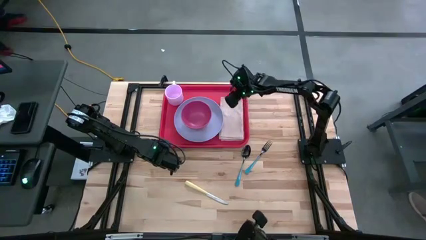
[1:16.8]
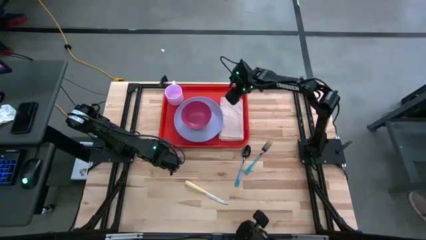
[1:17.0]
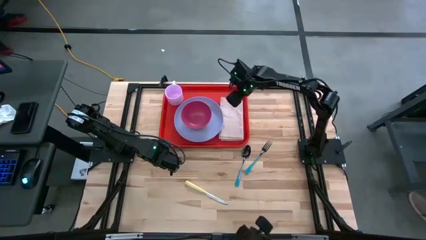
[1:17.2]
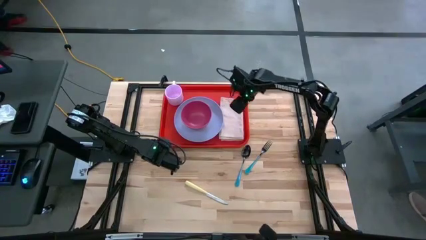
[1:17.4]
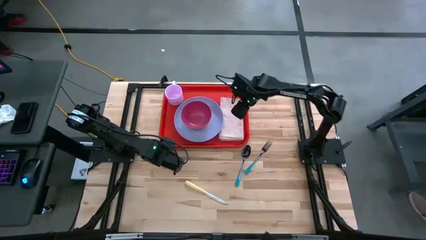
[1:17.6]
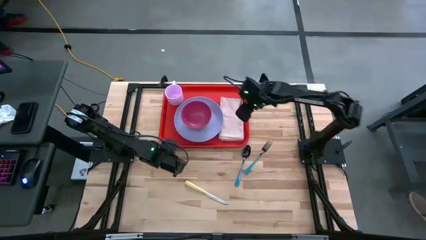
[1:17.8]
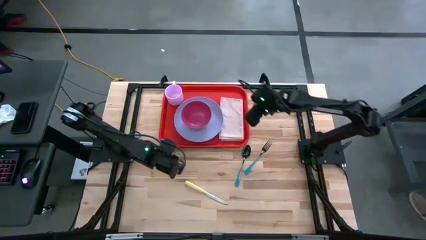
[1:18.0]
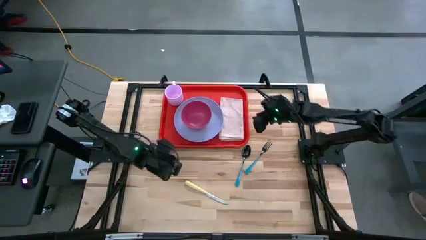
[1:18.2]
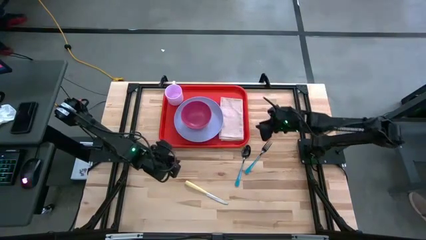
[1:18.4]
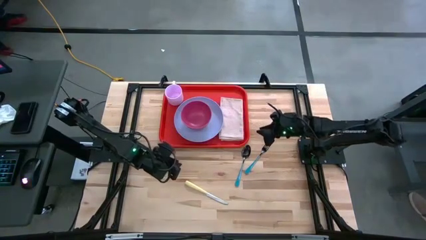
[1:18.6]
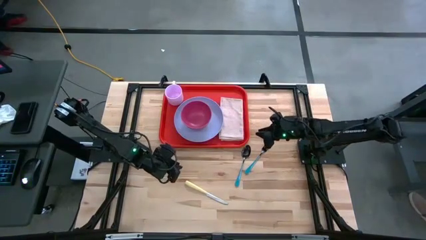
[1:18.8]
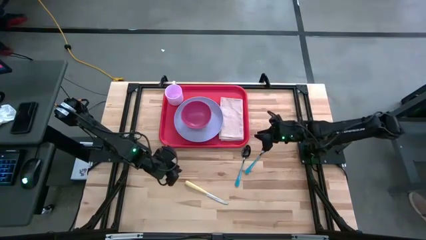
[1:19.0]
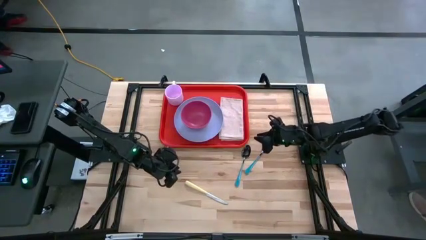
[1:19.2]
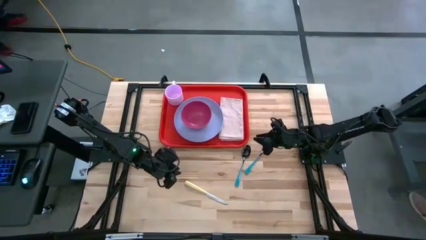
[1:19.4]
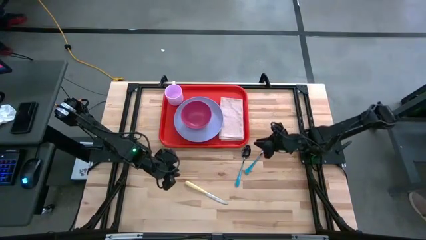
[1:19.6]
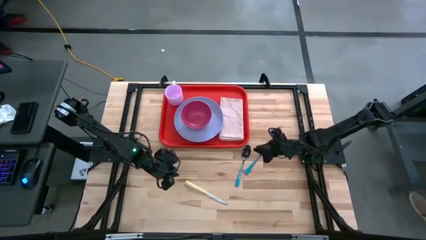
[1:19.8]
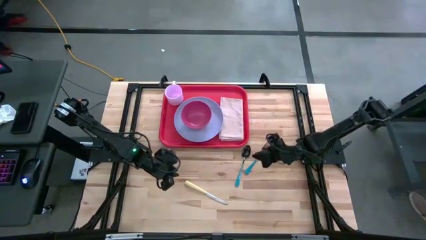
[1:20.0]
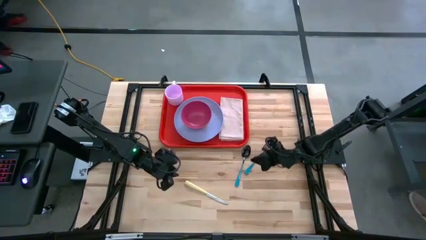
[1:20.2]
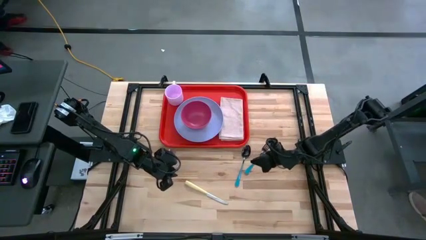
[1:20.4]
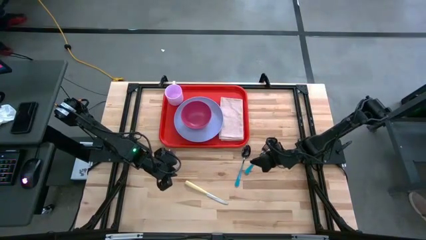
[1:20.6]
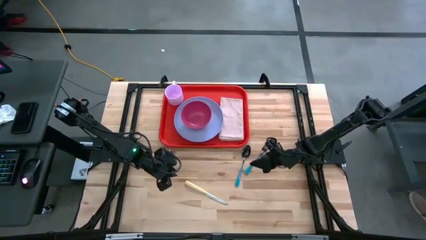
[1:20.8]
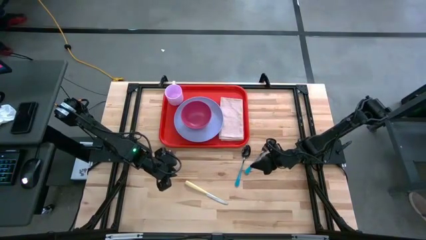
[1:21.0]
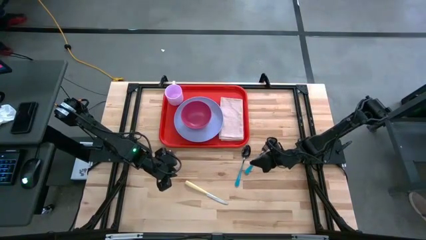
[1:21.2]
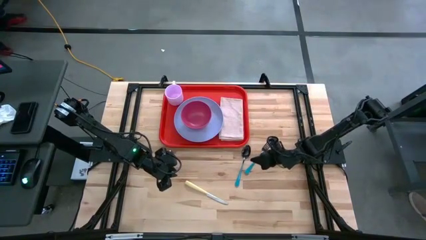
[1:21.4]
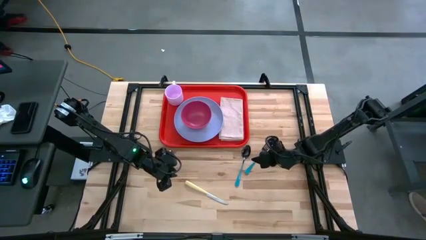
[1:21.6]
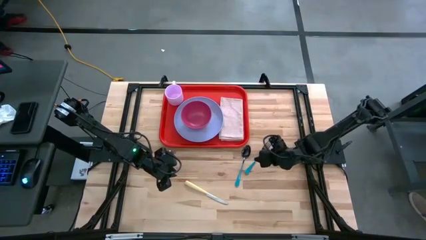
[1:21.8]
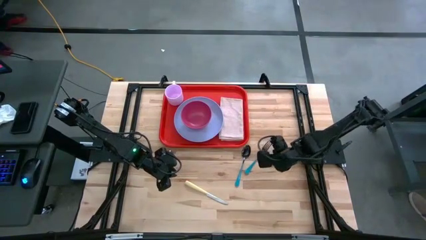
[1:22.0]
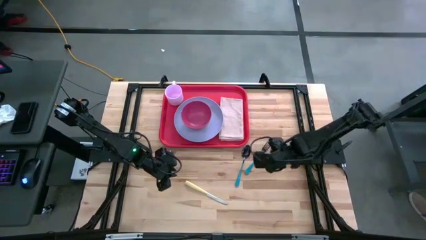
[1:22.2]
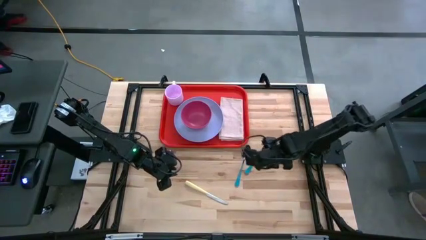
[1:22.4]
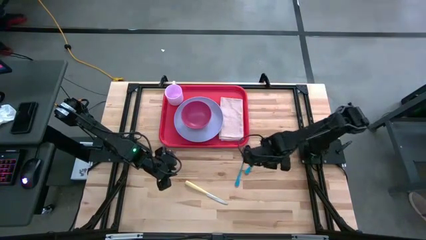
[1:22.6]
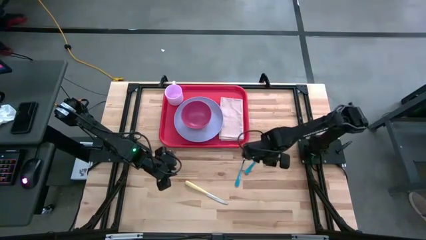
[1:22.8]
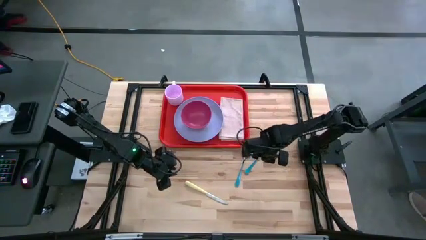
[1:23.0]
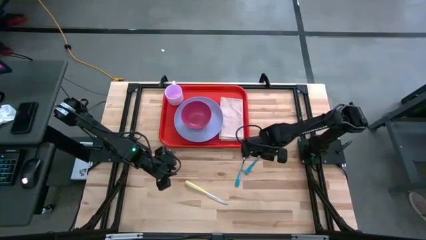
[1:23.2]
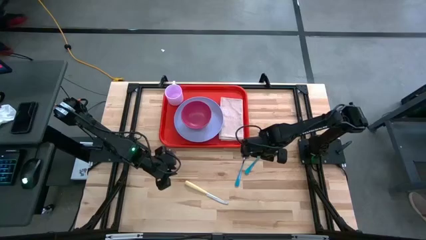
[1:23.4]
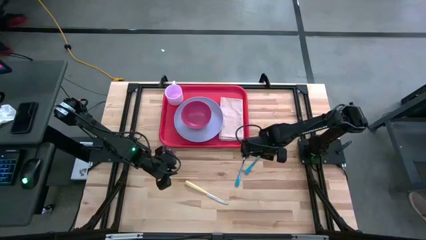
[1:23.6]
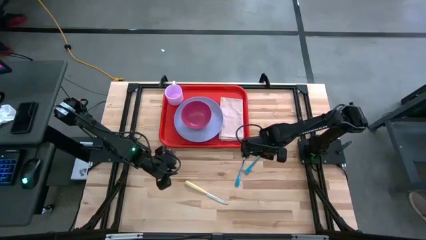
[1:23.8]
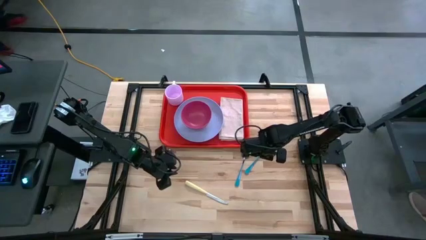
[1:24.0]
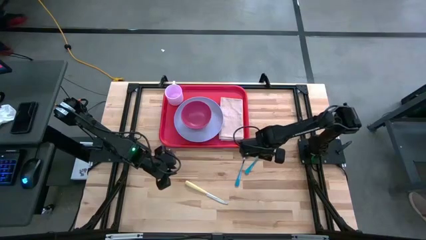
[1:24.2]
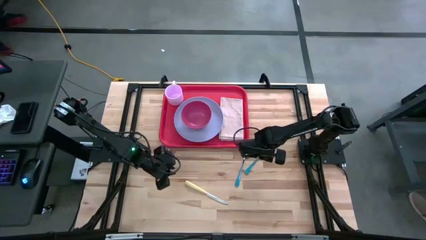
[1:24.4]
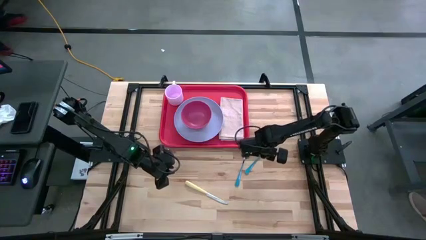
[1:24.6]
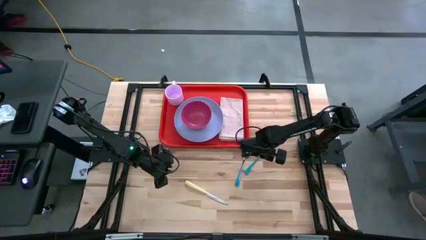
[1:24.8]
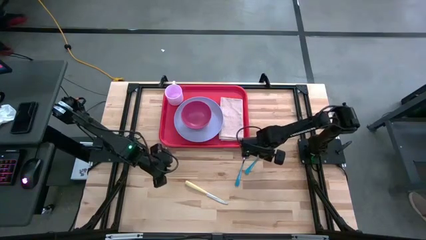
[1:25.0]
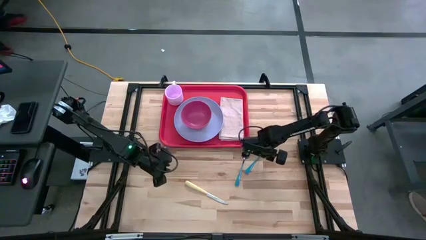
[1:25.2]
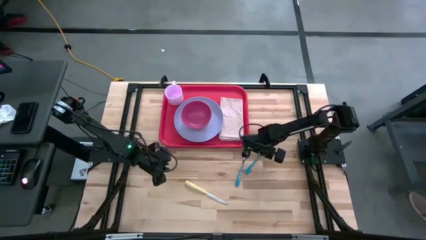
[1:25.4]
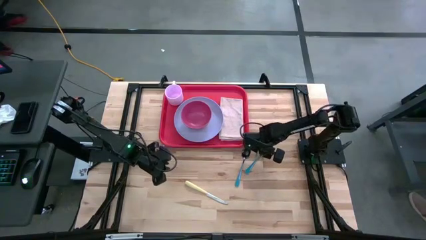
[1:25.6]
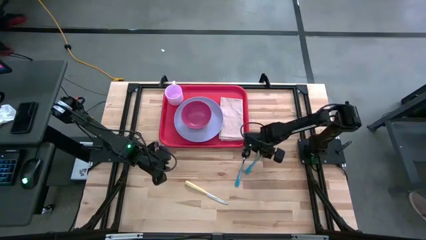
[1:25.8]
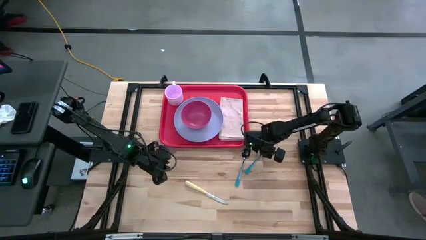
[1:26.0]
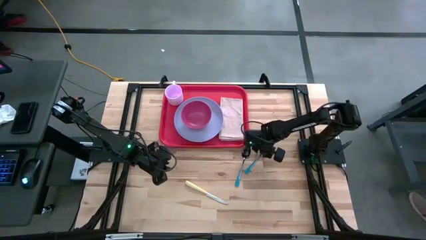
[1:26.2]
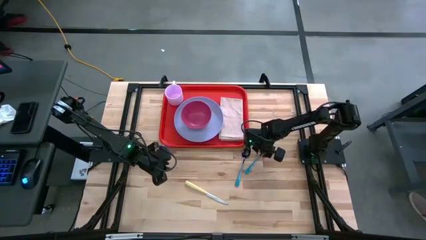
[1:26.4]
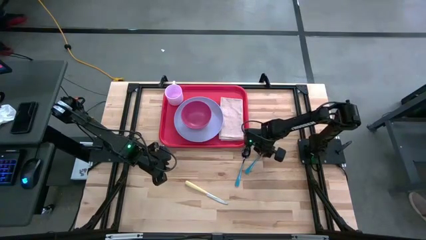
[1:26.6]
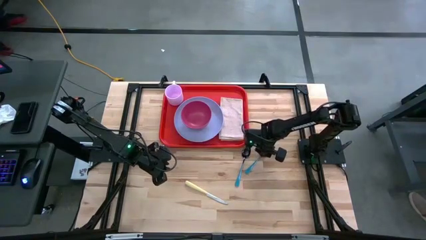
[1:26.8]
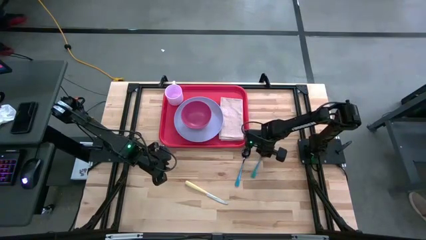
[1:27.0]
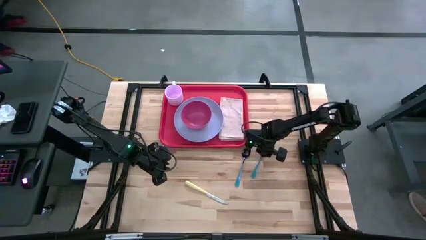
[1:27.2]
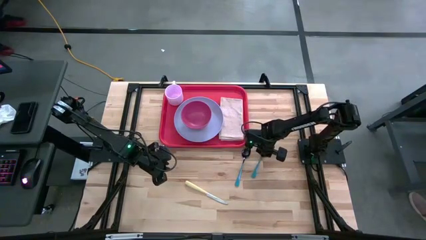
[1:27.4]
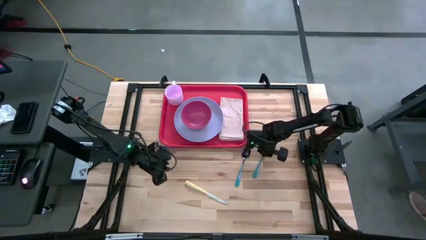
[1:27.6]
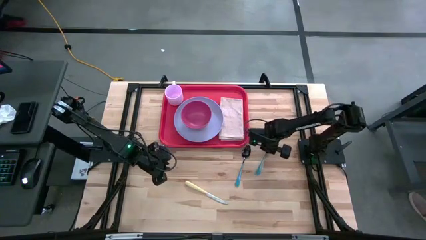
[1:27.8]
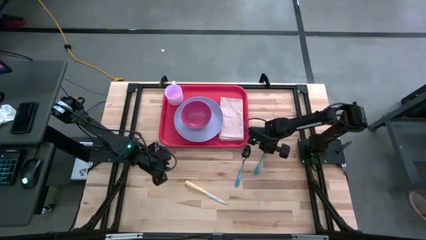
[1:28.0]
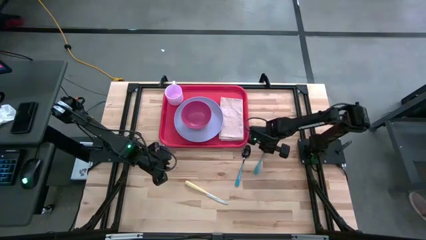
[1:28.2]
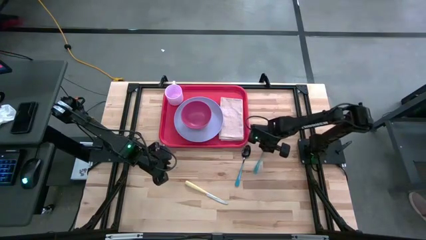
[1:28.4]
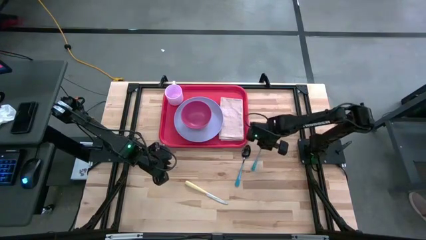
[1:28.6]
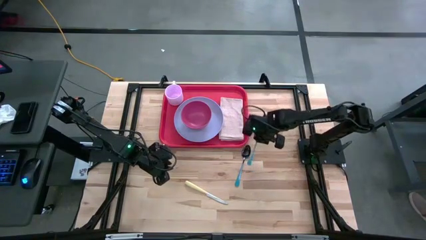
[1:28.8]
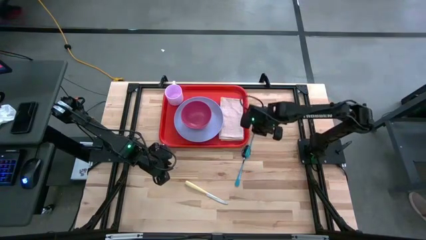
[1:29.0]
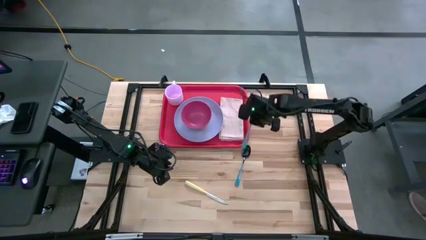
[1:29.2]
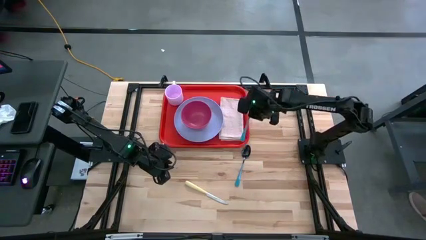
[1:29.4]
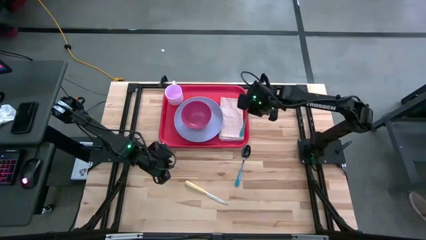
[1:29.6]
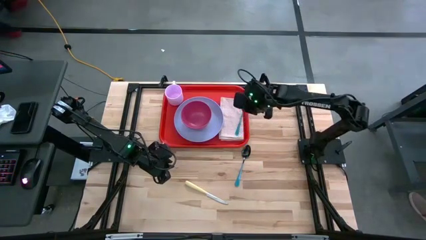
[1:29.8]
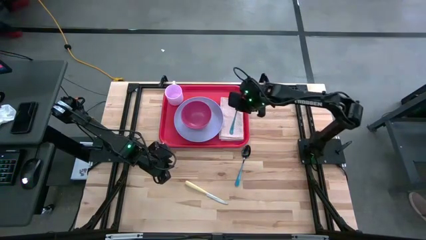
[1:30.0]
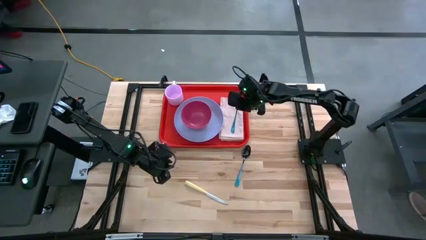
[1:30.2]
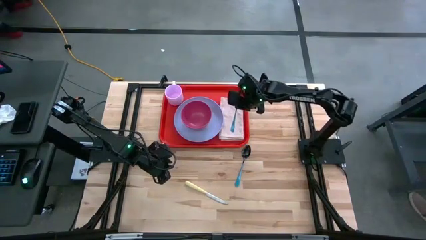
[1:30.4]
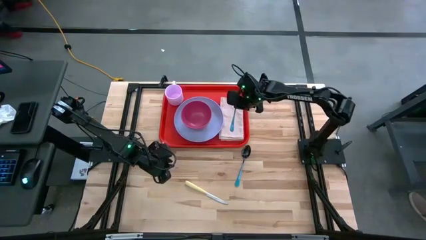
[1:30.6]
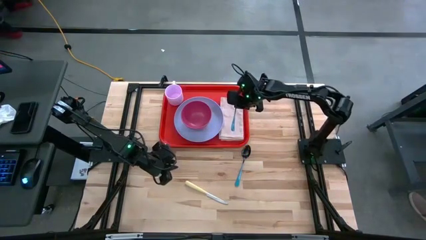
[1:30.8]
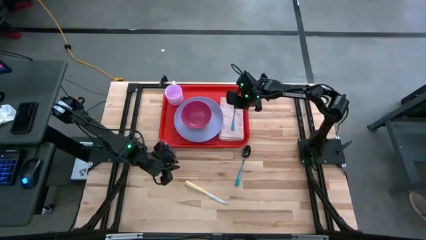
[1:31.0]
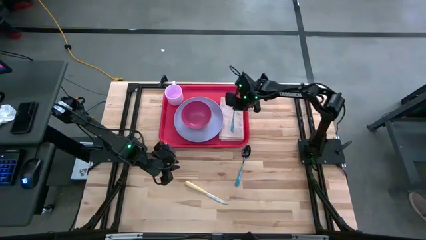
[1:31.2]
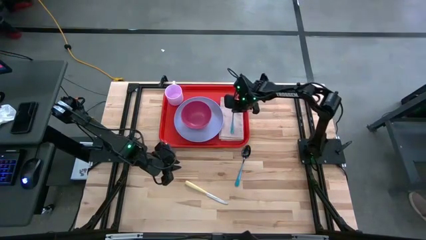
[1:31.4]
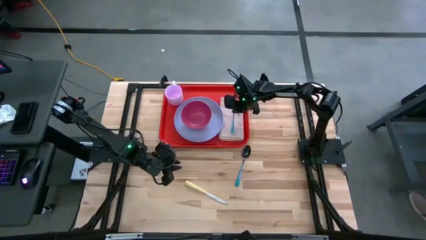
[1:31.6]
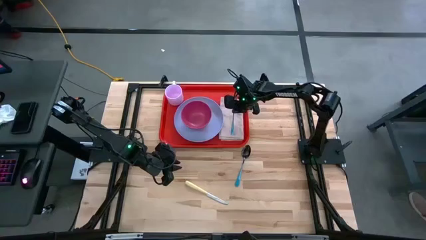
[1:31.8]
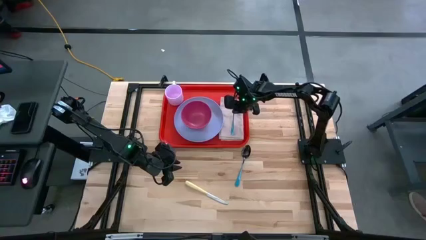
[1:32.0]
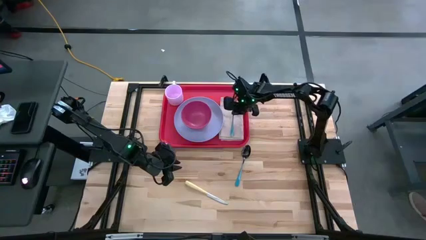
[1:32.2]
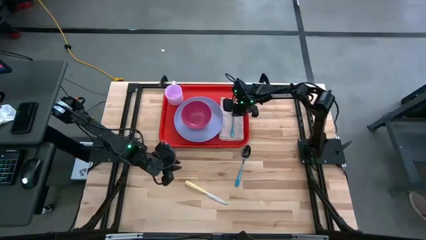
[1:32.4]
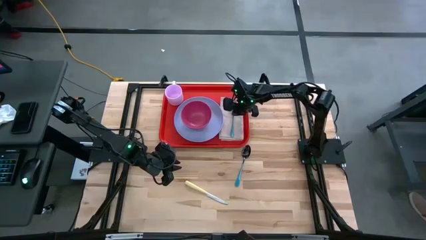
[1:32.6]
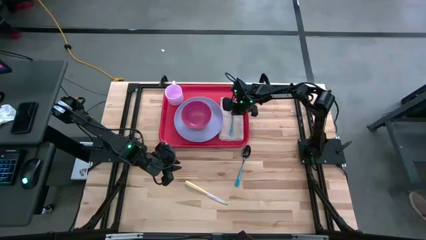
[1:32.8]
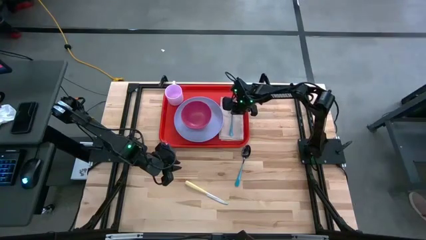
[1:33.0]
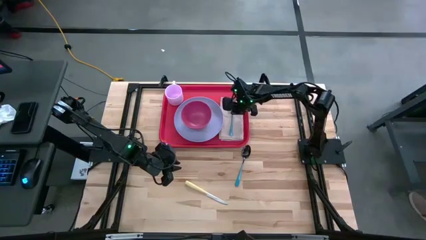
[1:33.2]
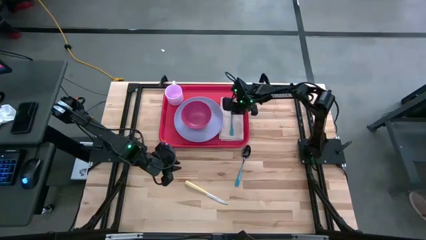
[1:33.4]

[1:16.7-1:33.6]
Task: Set up tray
Put the blue fork on the brown napkin
